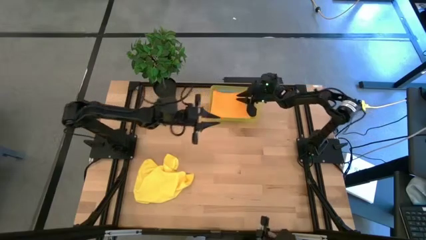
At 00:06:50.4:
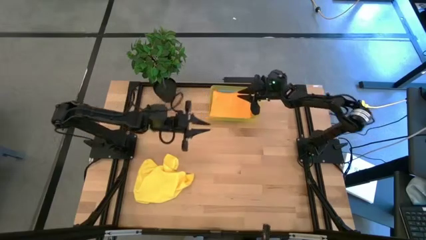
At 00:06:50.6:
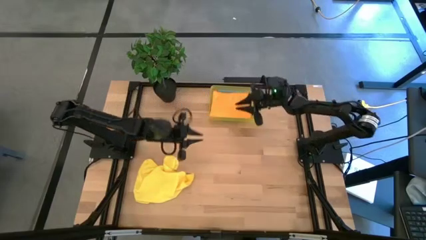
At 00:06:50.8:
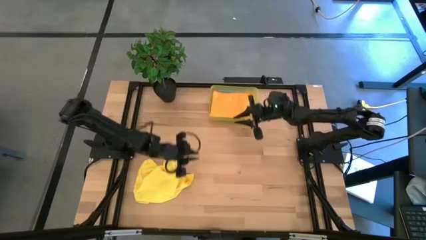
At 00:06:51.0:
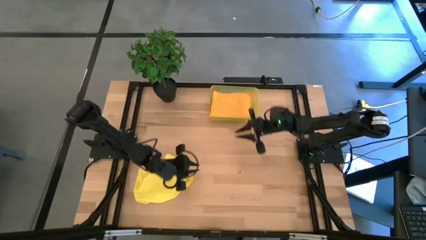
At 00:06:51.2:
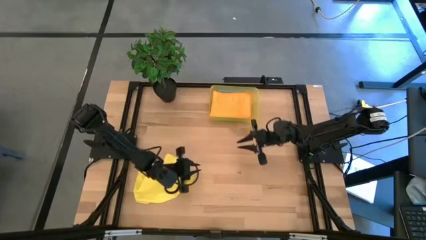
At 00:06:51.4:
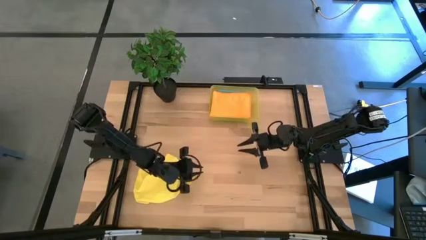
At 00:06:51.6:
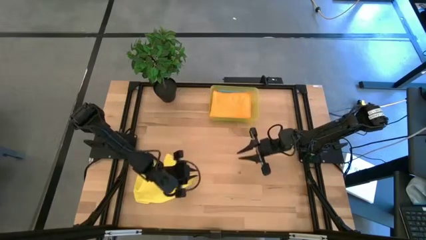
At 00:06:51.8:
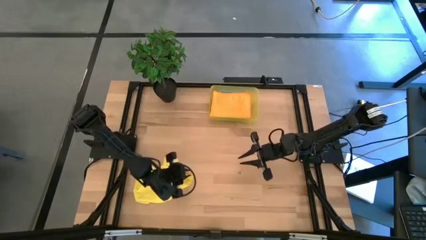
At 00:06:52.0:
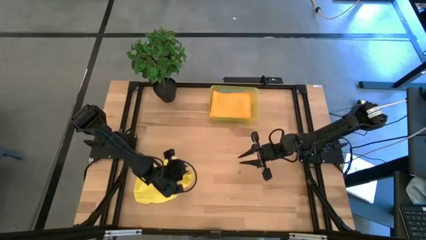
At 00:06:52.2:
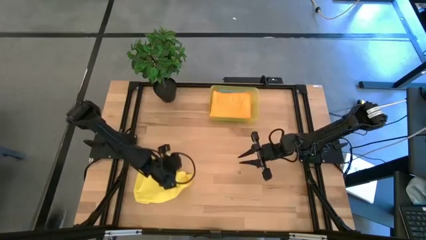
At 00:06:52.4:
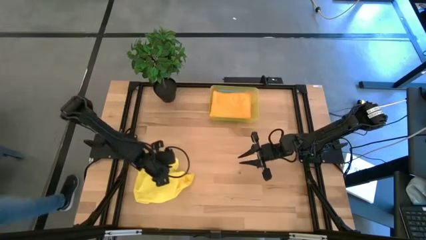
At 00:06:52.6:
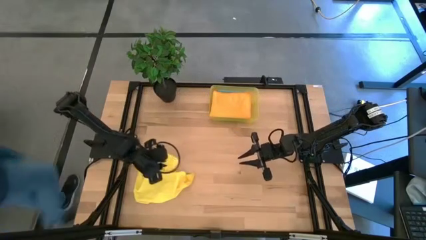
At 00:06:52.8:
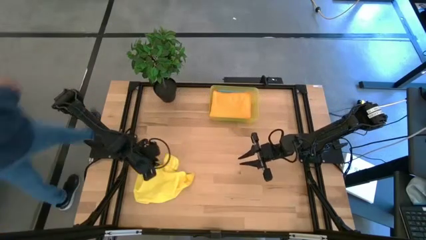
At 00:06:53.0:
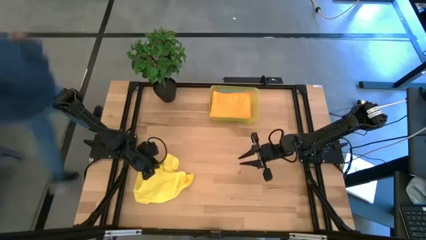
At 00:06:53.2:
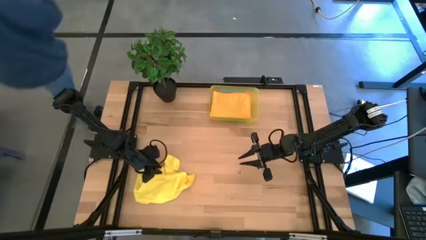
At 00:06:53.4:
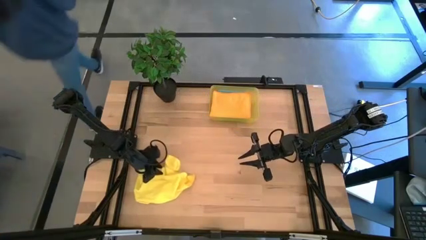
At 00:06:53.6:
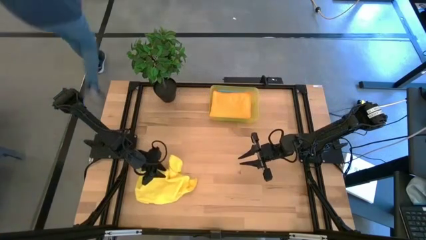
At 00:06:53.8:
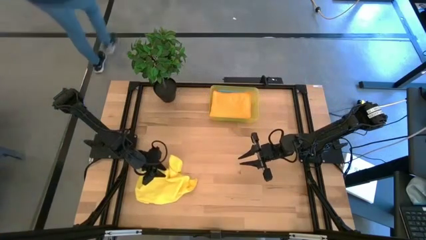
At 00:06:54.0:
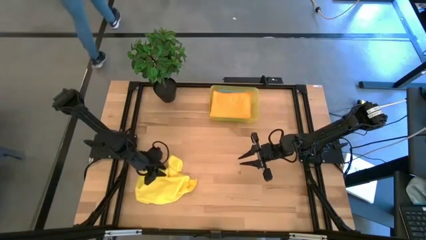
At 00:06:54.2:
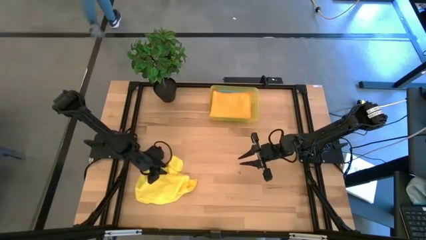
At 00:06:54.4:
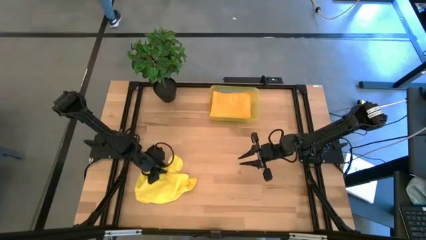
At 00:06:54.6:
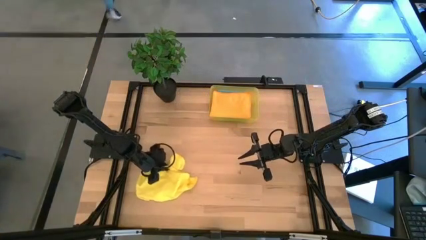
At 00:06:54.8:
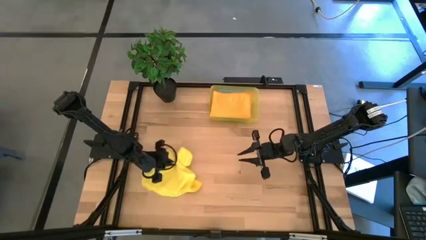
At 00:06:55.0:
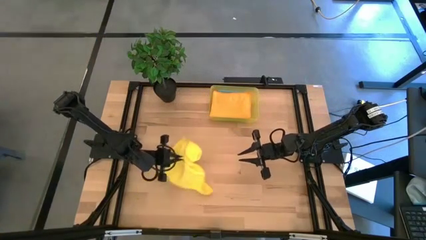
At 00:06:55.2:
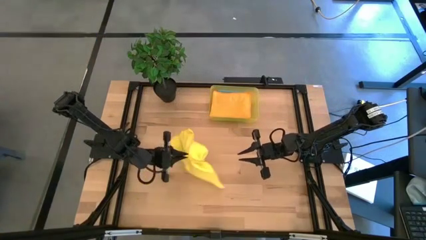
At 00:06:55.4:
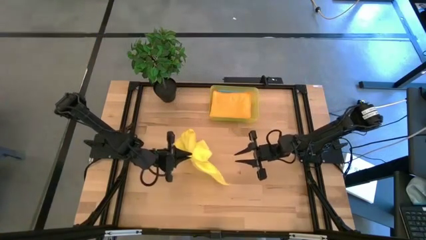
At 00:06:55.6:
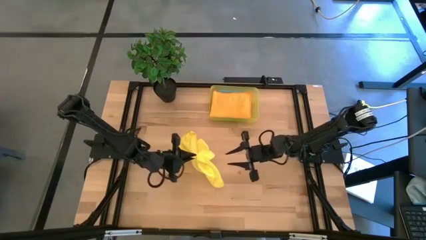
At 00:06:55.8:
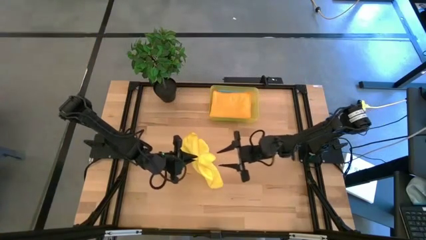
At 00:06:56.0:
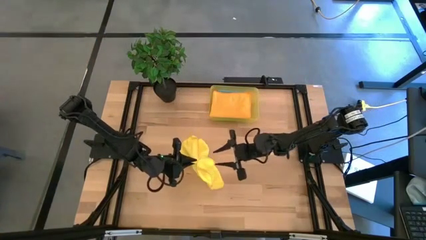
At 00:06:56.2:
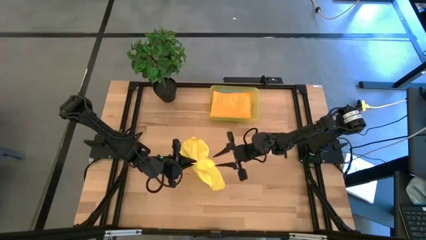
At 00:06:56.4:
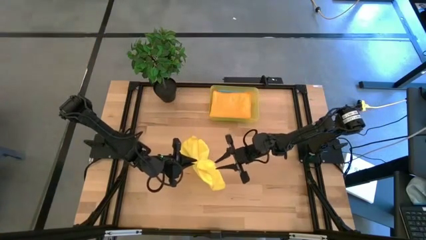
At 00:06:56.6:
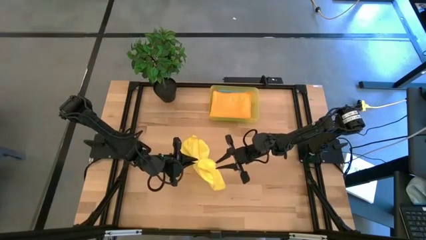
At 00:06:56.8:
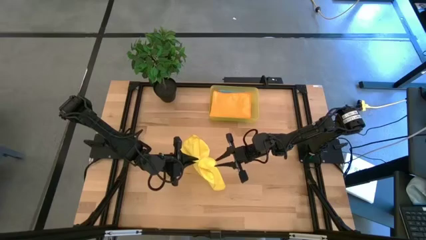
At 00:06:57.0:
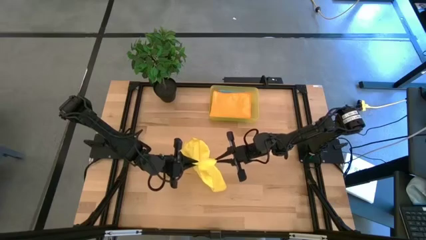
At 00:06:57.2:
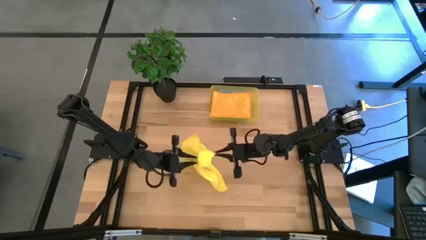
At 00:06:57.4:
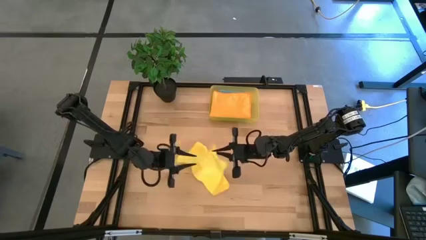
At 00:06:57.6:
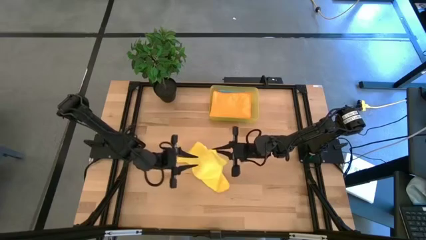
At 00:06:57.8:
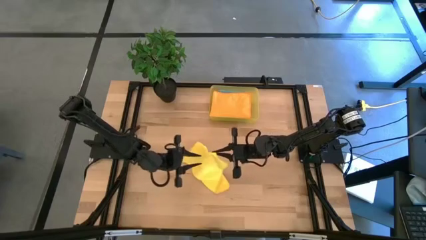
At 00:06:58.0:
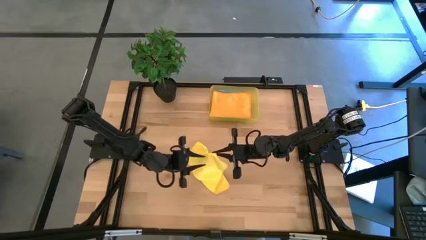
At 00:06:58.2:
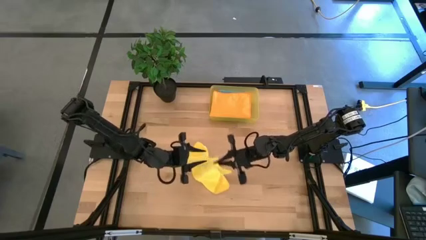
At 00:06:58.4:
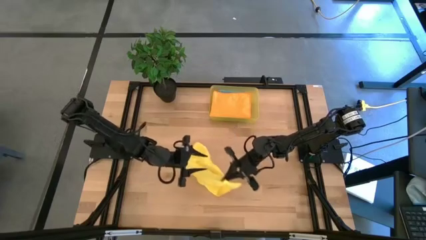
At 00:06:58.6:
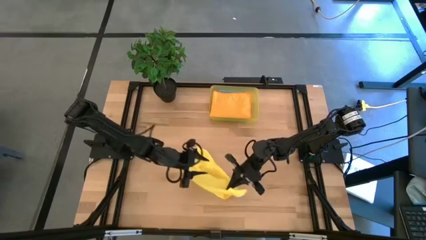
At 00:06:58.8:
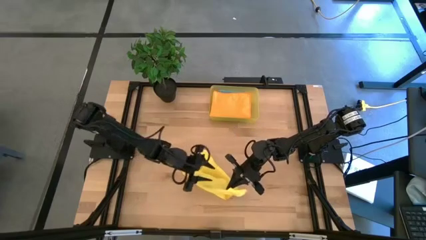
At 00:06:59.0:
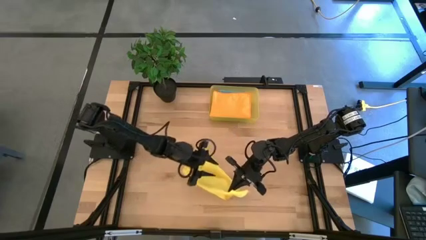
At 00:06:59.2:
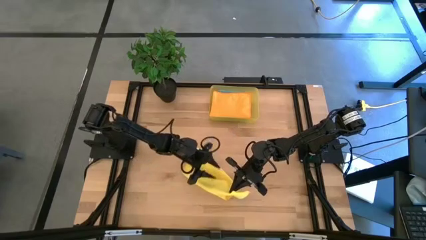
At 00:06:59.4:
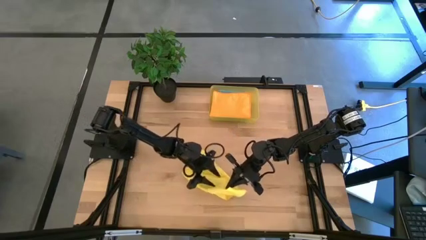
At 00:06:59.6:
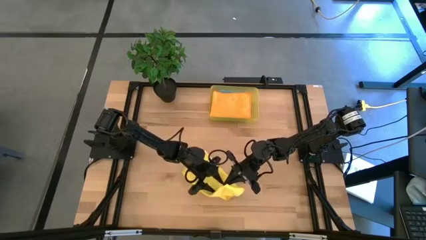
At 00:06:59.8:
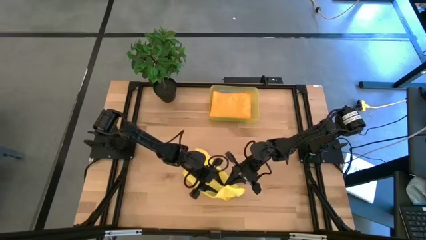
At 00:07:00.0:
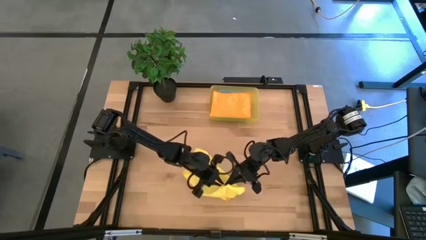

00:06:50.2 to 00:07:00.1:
Task: Fold microfiber towels
Fold the yellow microfiber towel

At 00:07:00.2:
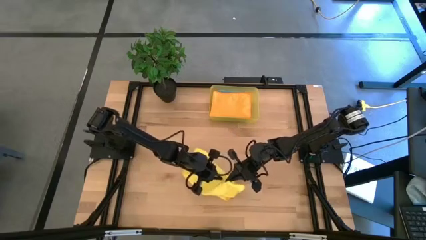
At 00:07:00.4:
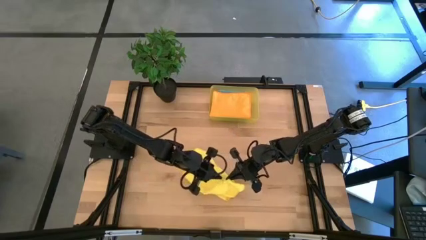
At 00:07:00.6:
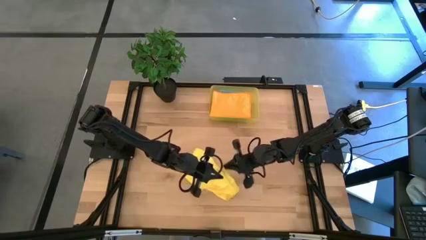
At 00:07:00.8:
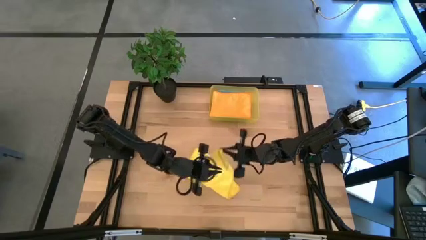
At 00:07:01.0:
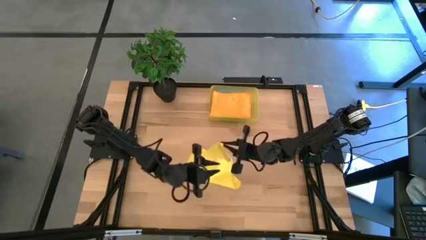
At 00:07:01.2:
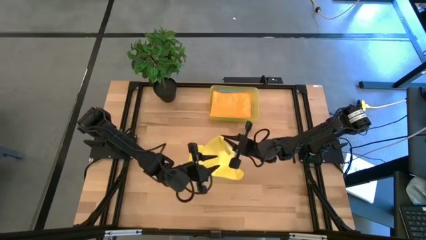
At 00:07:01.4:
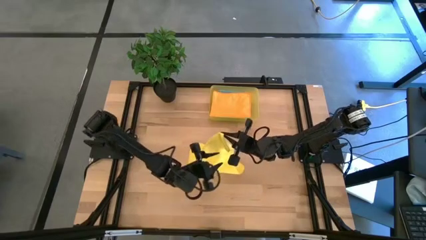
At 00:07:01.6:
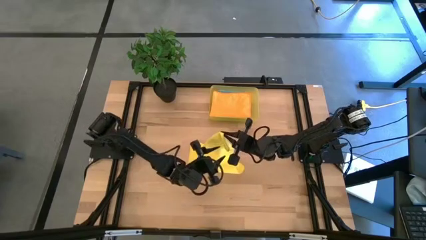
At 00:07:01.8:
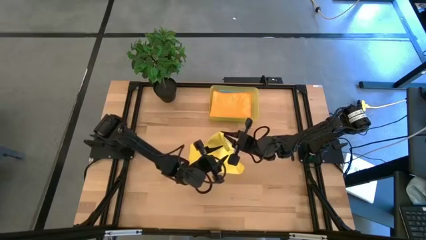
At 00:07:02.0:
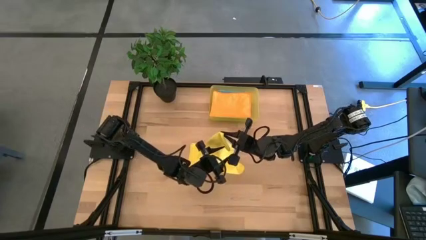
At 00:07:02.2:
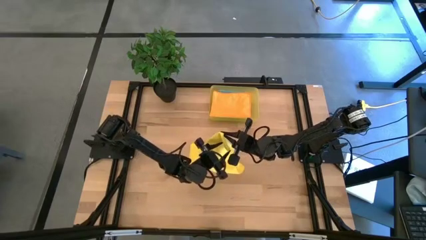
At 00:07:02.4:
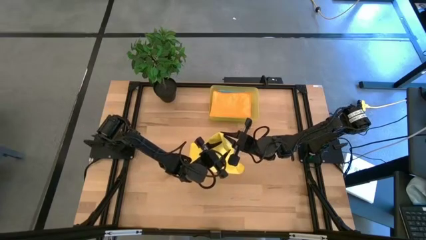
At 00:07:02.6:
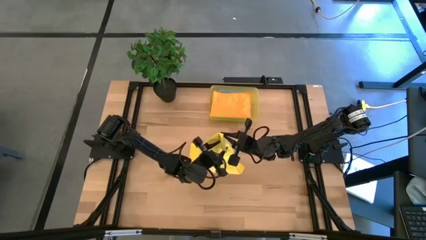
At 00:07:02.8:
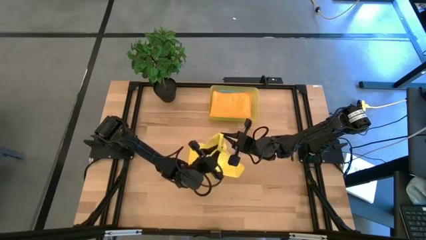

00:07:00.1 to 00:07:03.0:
Fold the yellow microfiber towel

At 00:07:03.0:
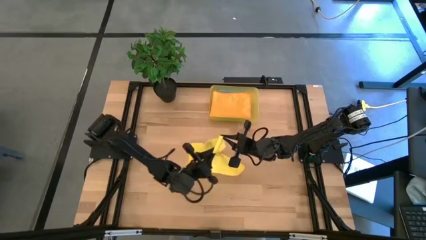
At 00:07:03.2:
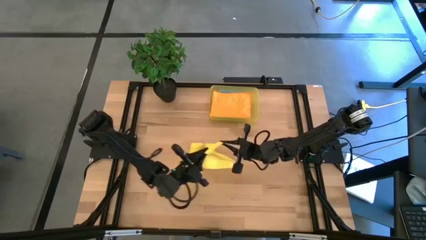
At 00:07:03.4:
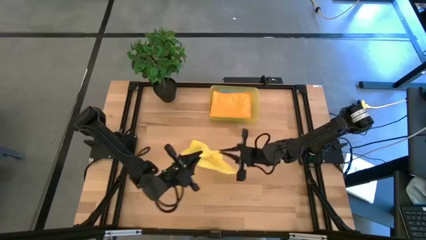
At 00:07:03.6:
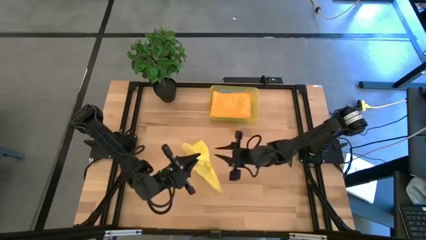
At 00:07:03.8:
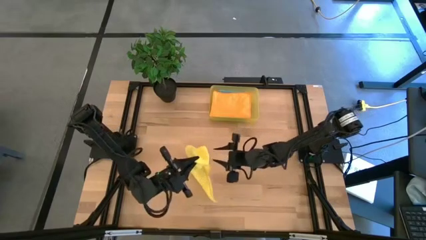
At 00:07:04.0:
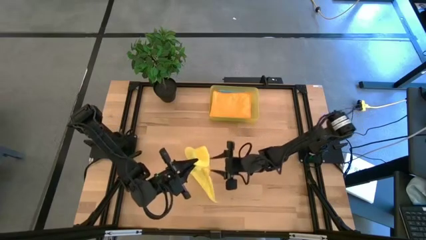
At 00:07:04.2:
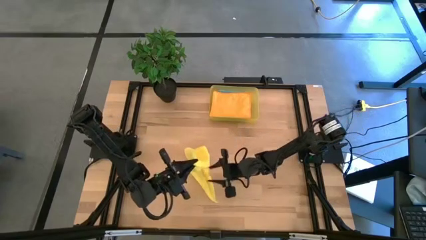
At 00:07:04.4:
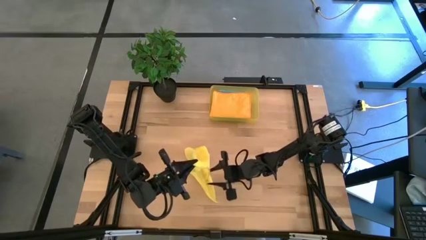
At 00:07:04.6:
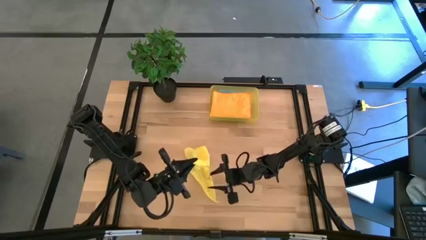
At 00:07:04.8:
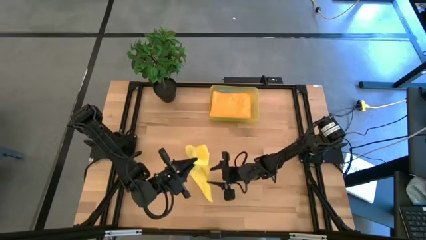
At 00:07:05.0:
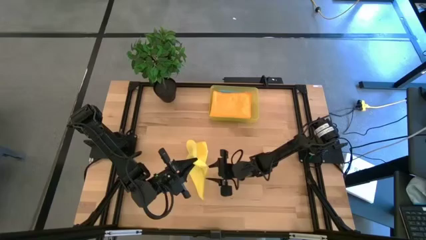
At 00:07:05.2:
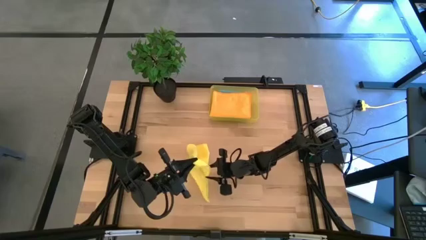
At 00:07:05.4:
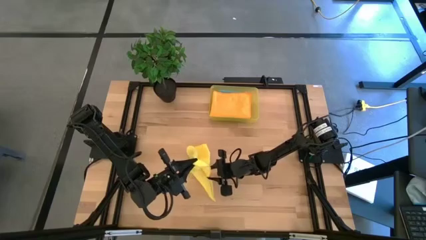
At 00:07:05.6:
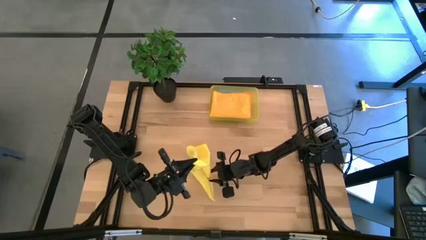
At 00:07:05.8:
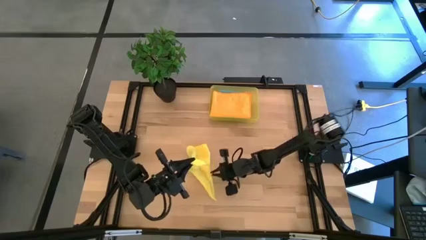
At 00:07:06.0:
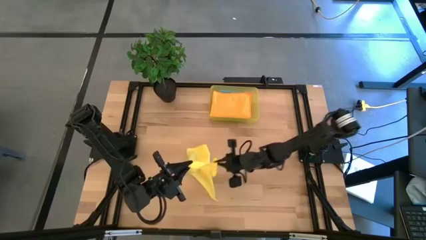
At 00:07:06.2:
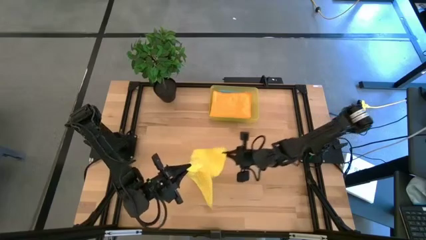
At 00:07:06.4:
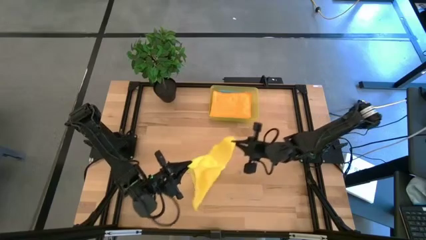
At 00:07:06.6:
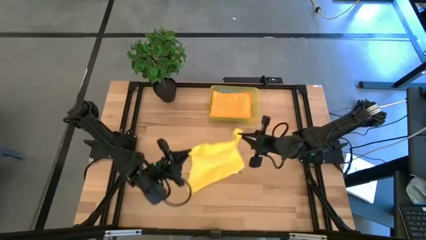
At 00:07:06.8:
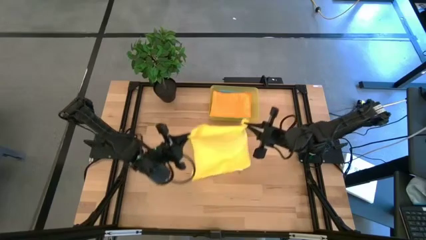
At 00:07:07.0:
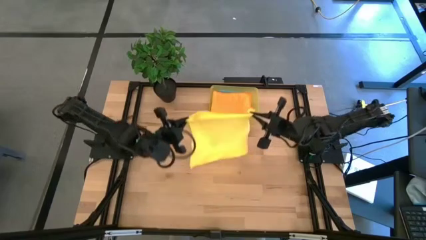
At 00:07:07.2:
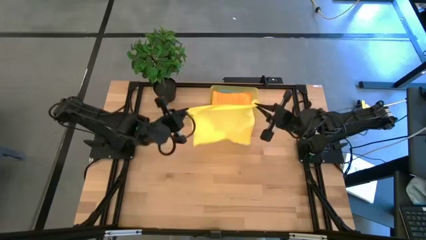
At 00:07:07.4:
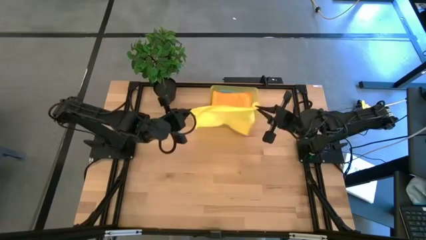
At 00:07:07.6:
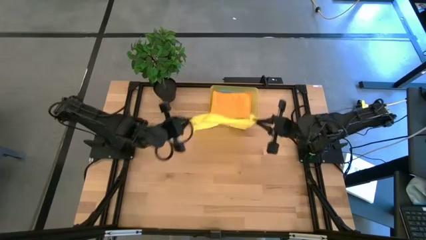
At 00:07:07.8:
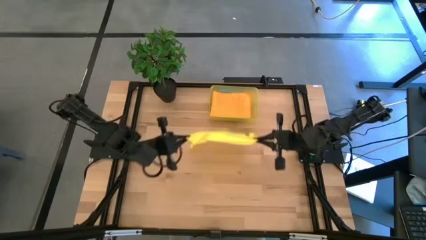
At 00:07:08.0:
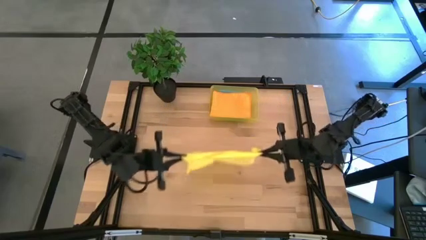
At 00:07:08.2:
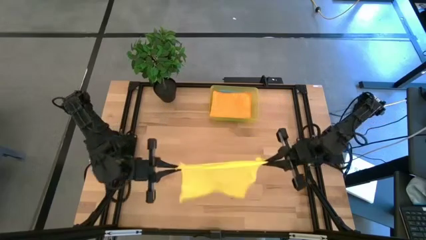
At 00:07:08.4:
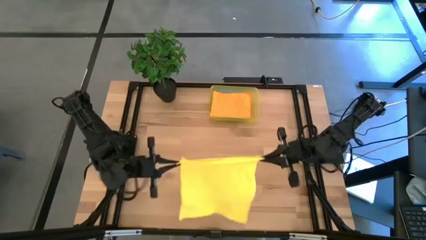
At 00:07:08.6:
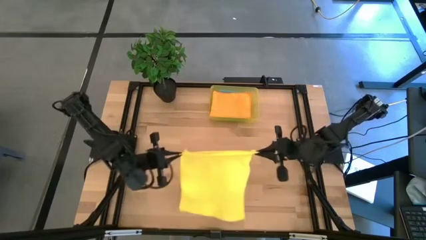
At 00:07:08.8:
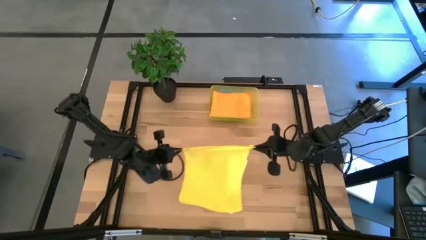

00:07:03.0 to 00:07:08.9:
Fold the yellow microfiber towel
